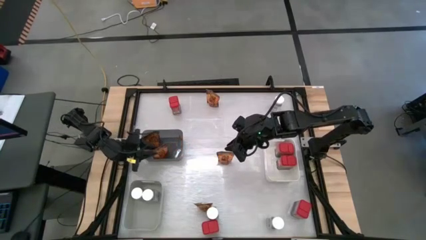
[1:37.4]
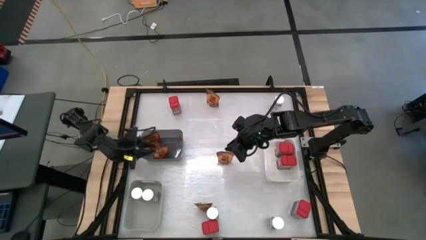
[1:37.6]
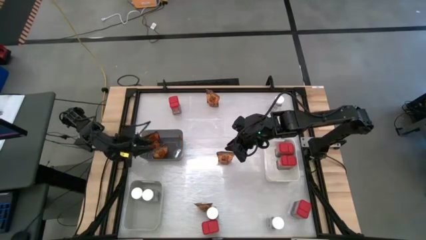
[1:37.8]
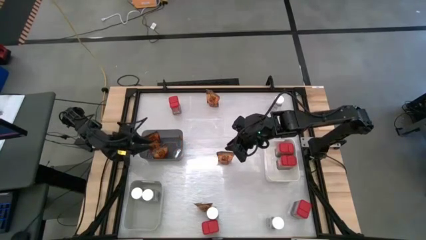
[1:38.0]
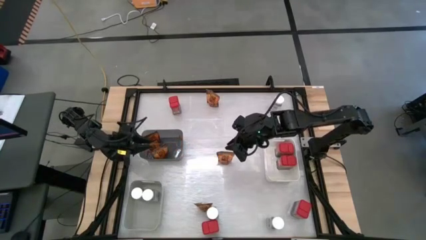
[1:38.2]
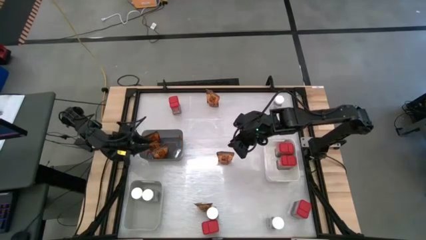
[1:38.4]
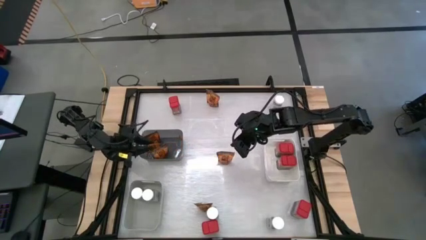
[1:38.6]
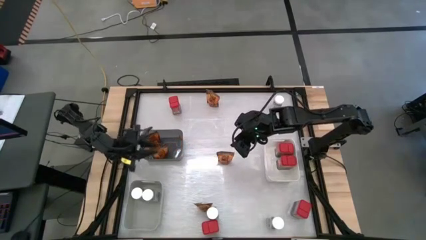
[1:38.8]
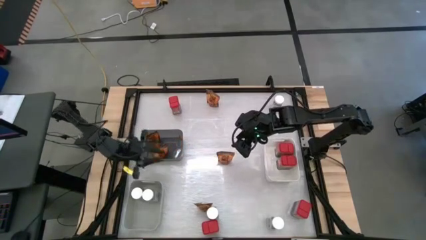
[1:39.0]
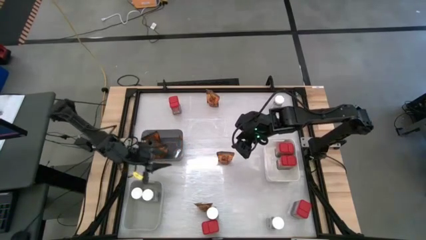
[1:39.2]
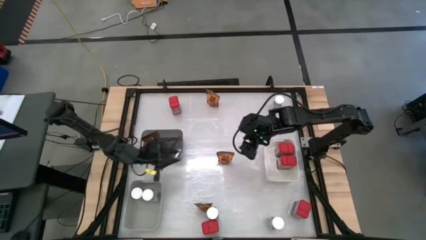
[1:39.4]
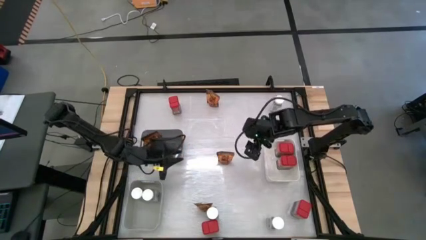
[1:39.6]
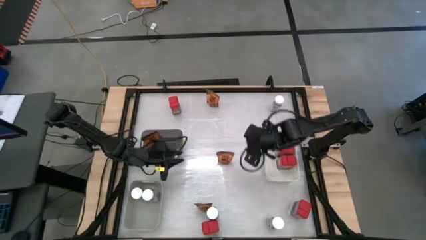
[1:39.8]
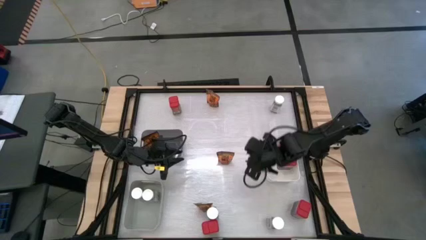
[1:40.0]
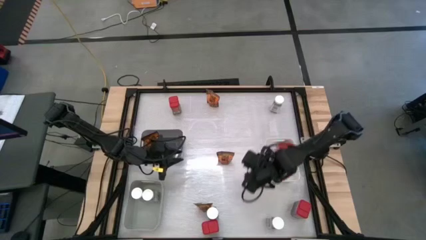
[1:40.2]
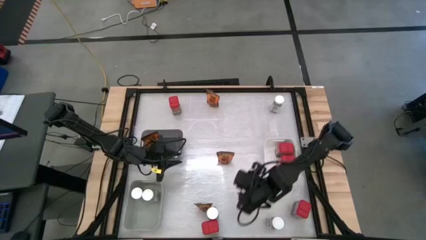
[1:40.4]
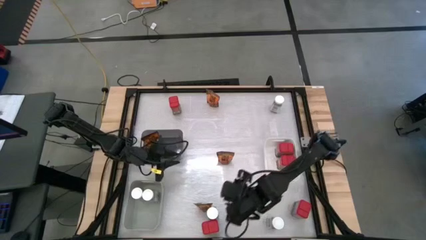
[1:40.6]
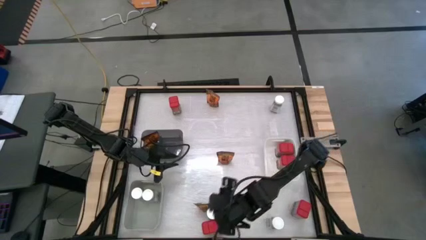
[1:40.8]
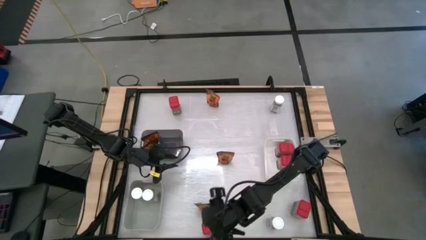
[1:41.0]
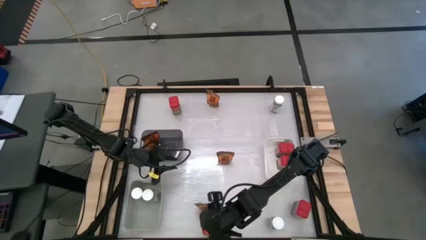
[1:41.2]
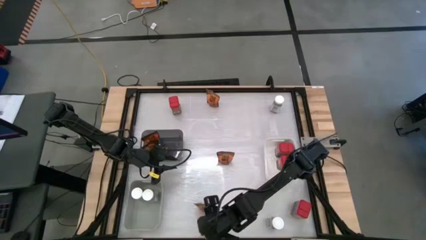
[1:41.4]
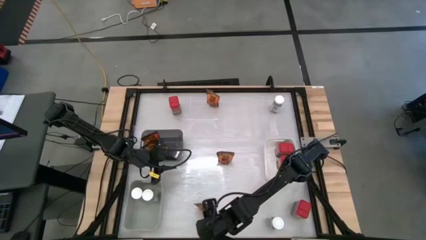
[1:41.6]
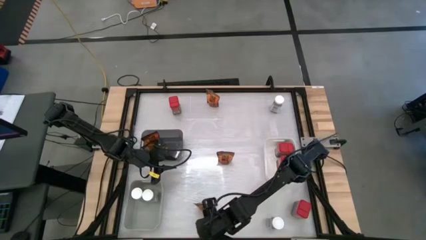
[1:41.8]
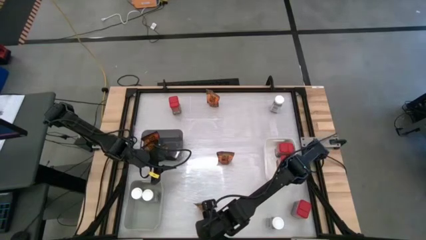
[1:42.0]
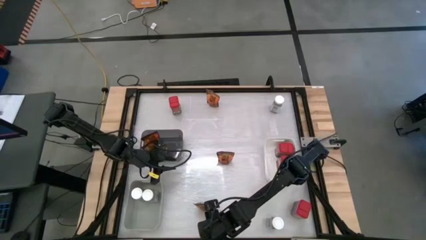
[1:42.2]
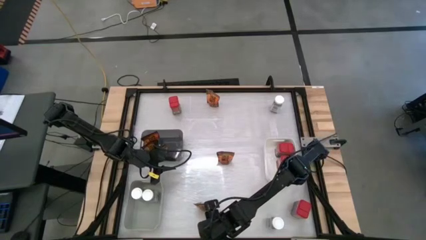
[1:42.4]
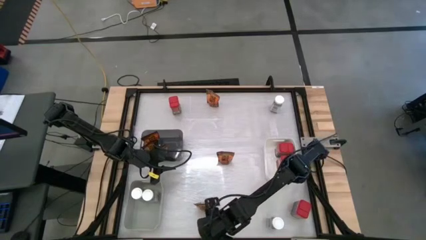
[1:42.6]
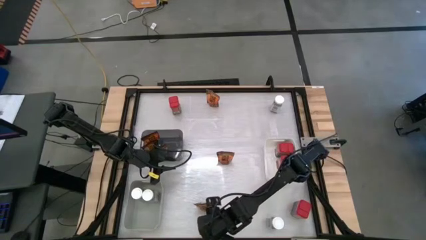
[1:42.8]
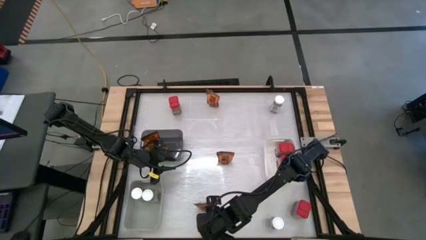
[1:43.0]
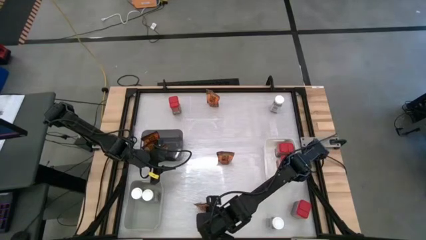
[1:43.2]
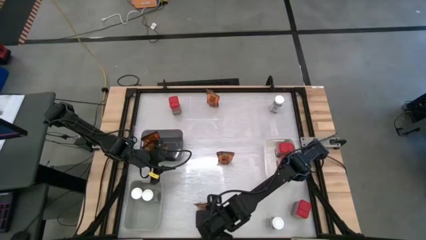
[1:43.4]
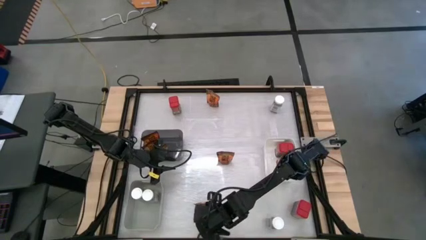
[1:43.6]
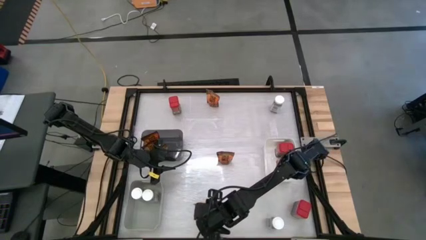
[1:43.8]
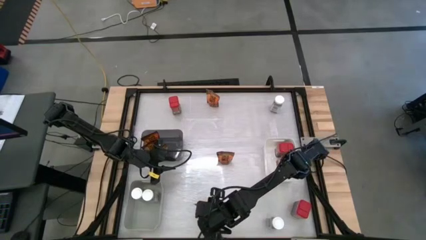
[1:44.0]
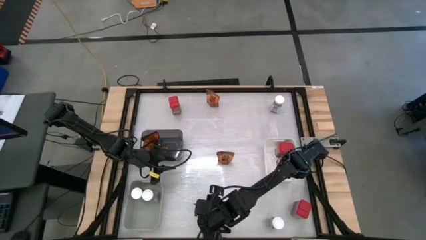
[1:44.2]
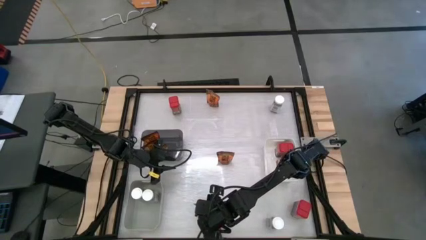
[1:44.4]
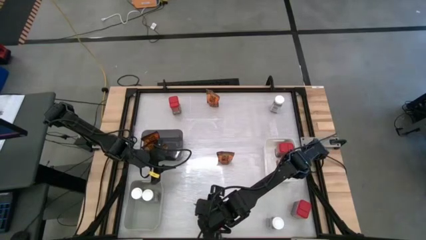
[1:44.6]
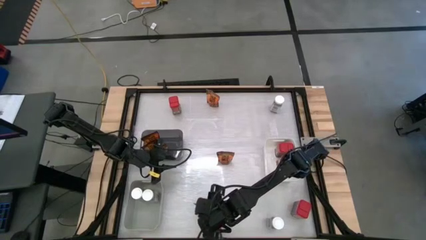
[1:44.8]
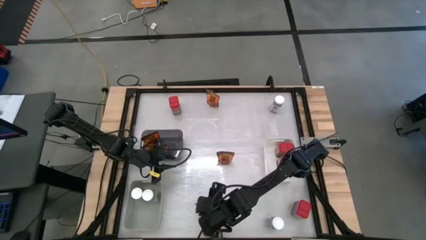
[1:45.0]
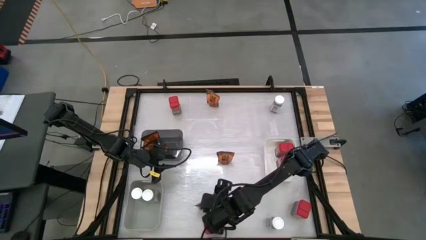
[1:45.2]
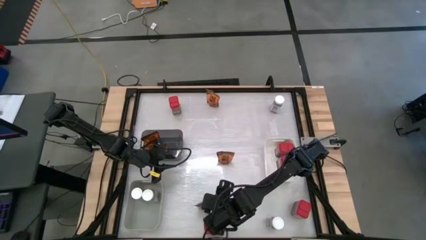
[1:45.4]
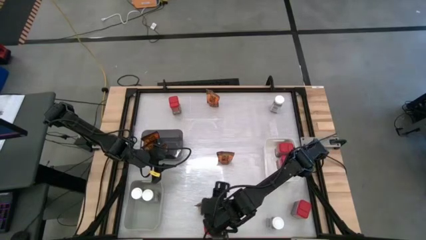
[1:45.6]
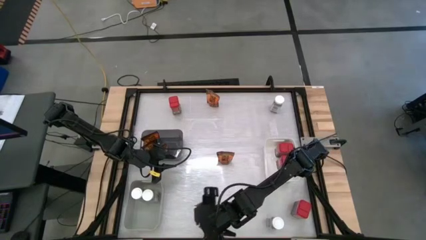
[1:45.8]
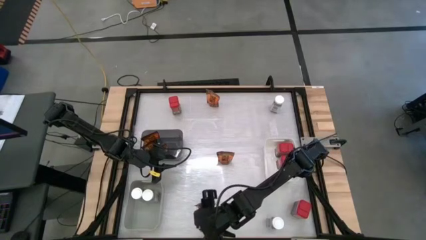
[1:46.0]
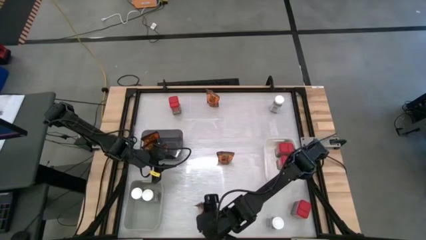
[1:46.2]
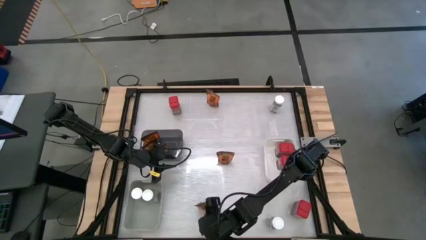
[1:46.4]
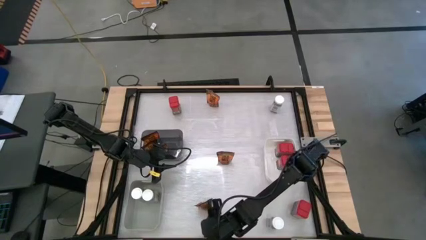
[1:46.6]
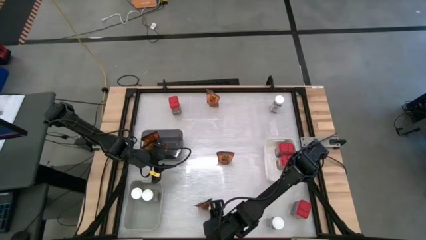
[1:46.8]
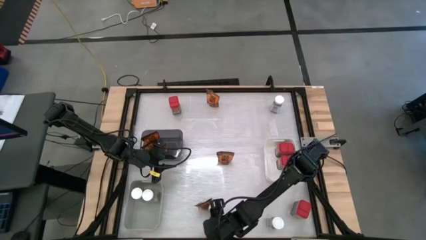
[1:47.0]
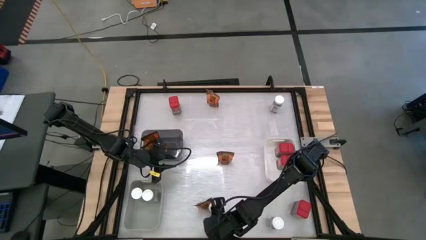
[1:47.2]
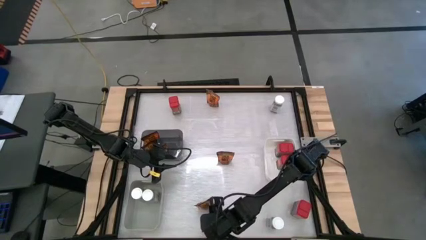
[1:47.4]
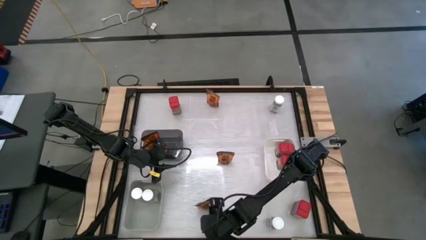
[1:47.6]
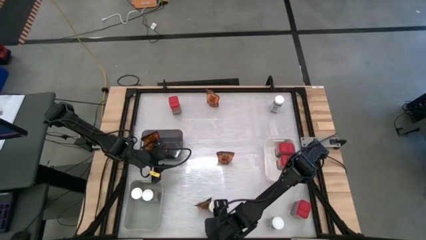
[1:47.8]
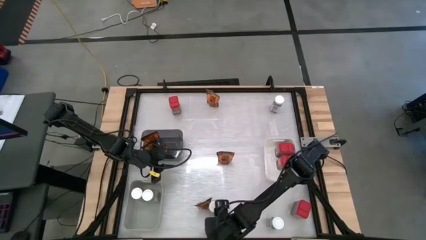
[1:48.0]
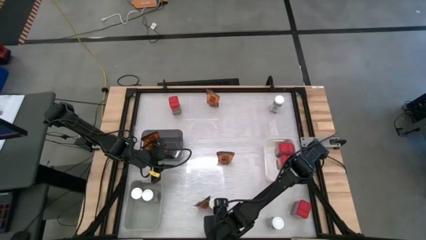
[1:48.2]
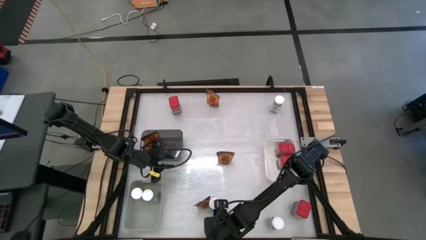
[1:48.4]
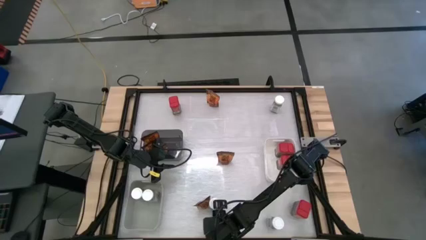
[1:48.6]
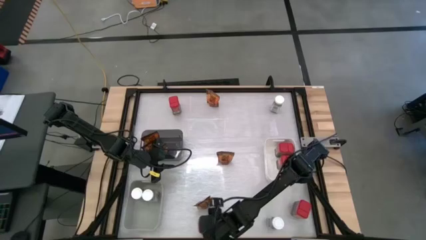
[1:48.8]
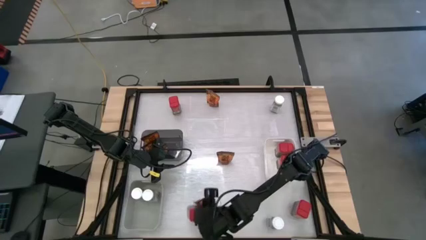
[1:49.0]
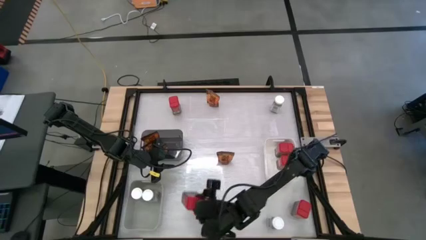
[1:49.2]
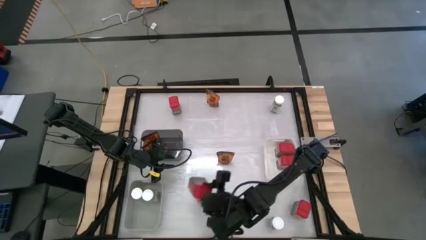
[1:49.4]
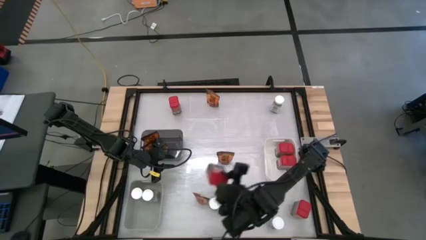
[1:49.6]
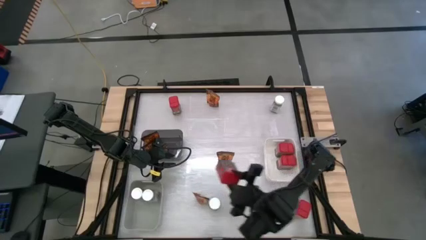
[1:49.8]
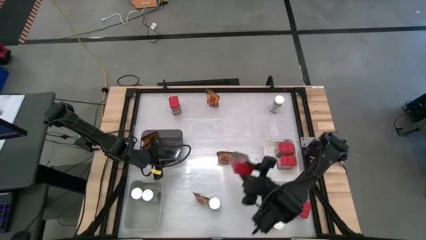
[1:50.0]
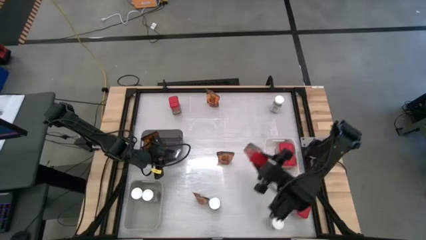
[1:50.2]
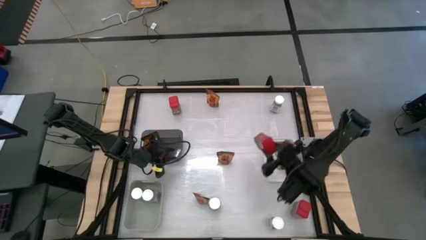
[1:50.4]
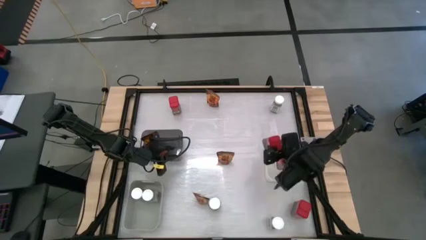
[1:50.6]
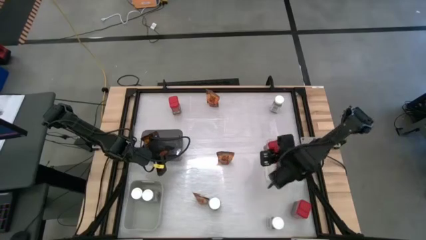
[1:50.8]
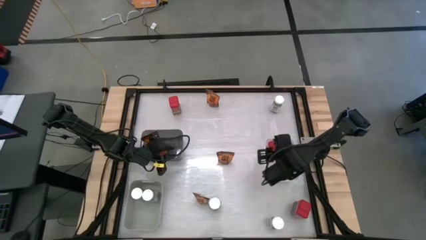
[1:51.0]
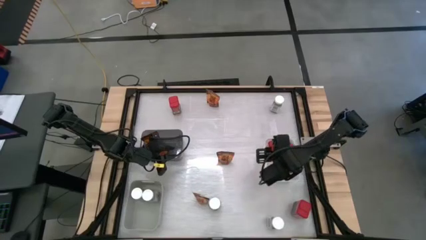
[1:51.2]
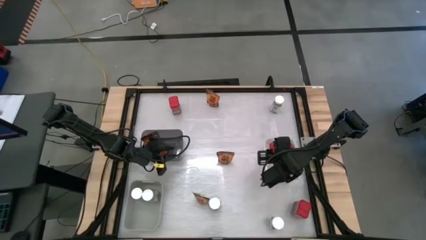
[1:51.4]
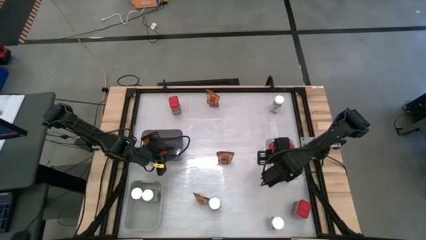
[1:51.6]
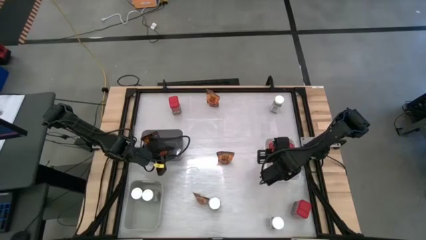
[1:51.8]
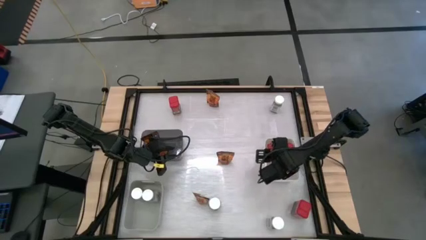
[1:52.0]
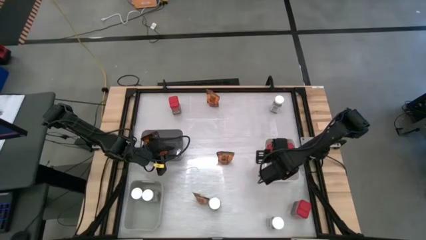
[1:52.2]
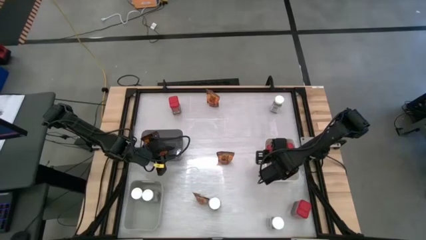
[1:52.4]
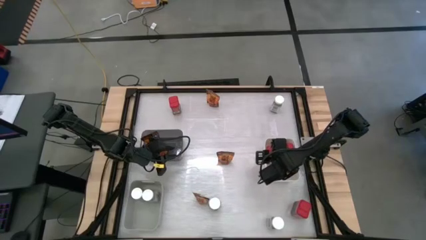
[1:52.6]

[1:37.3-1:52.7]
Task: Sort spices by type
Put the red spice can into the white bin
